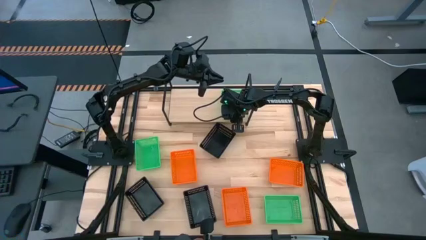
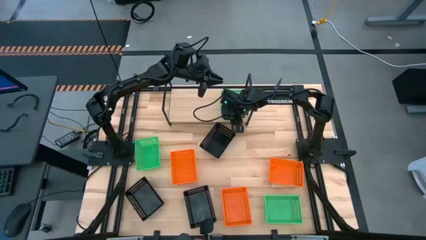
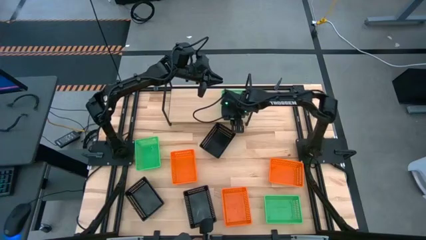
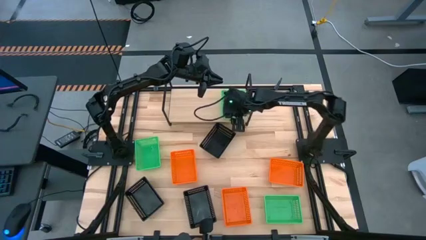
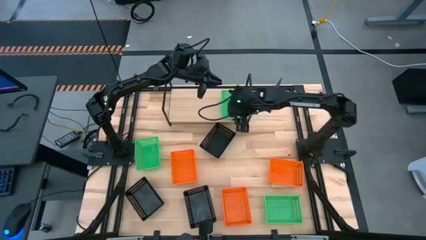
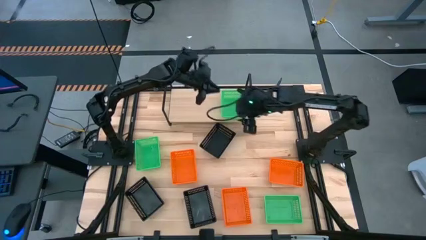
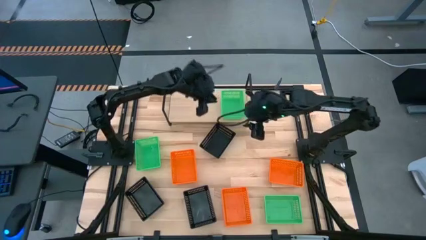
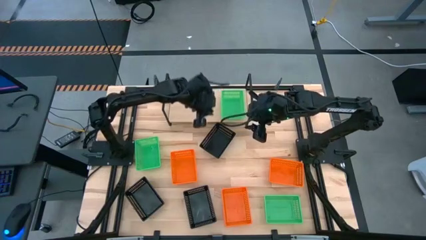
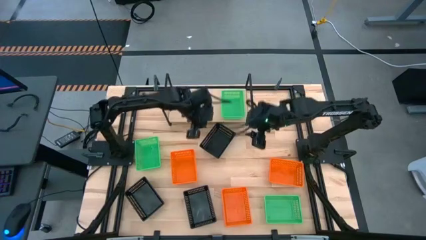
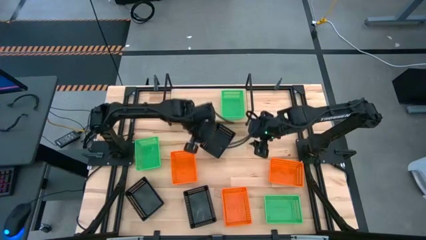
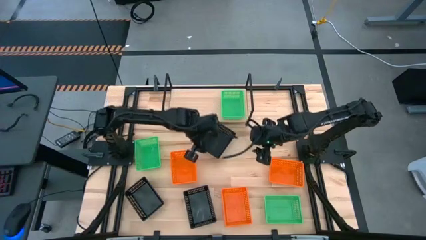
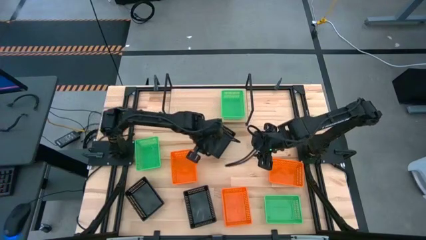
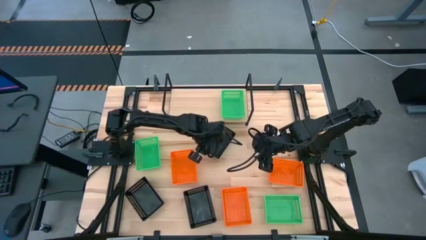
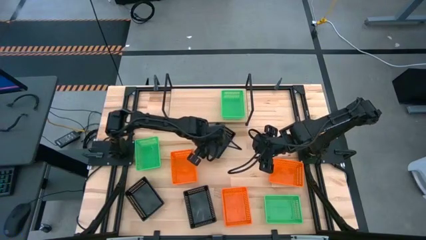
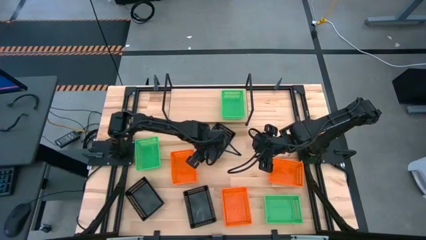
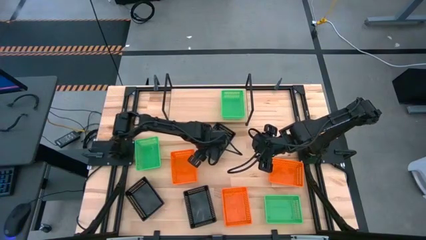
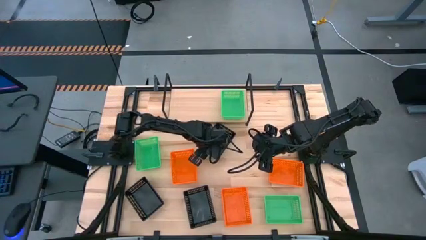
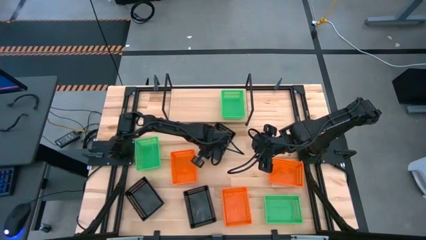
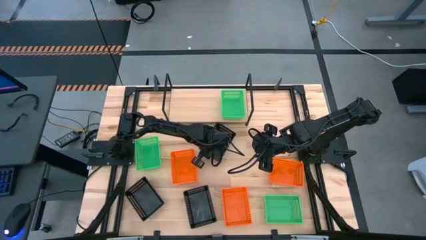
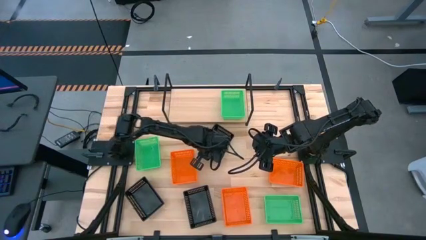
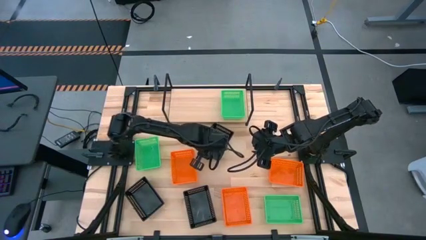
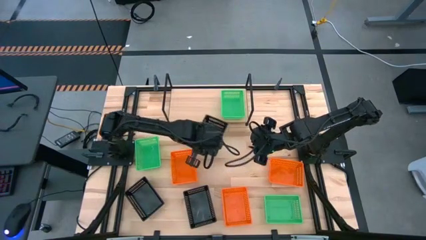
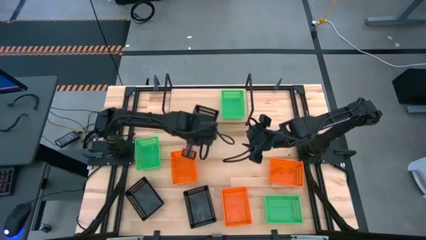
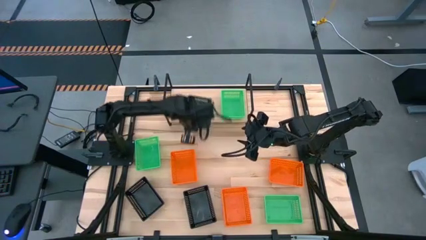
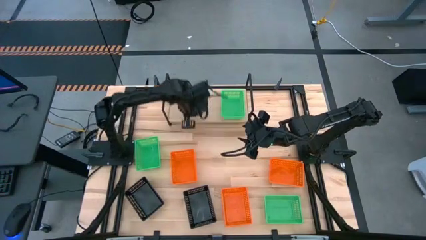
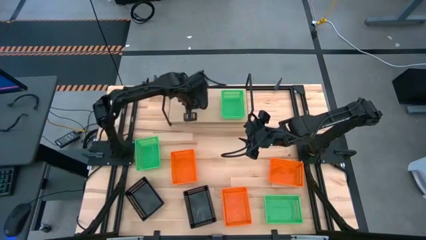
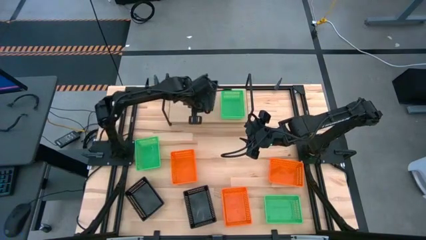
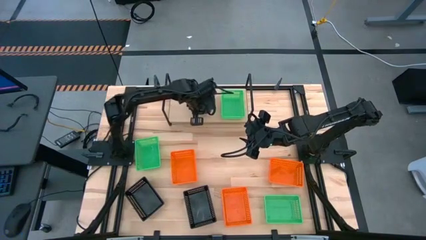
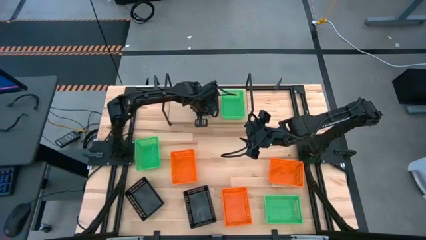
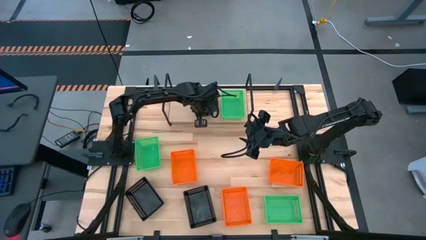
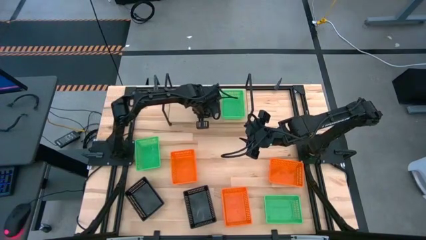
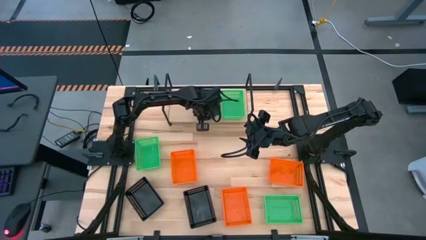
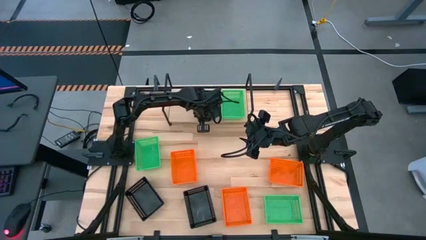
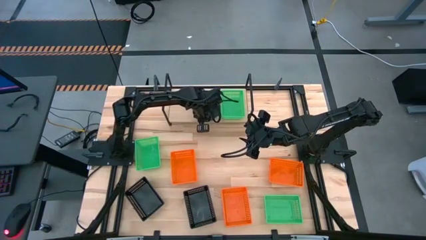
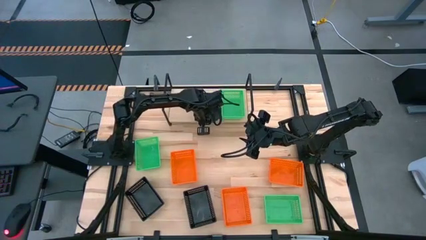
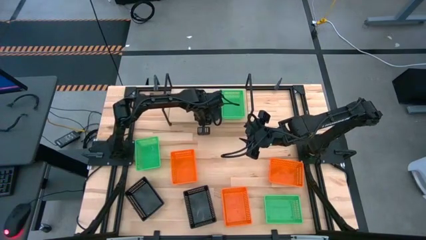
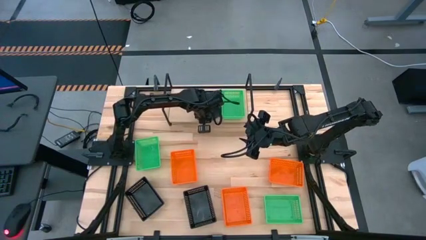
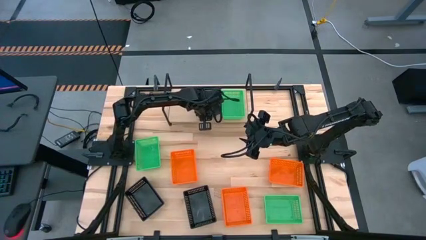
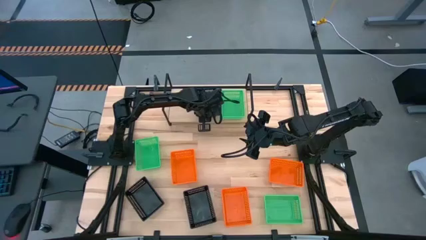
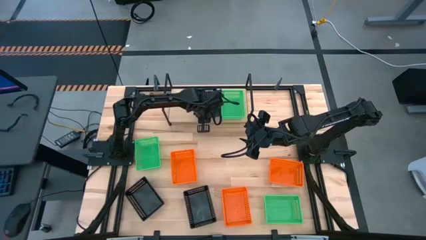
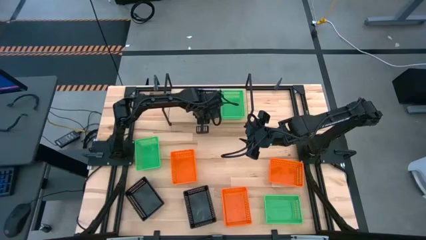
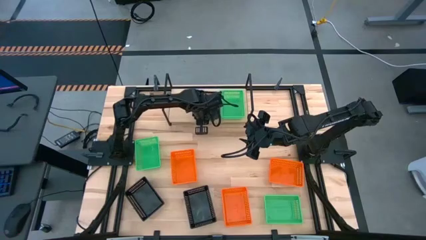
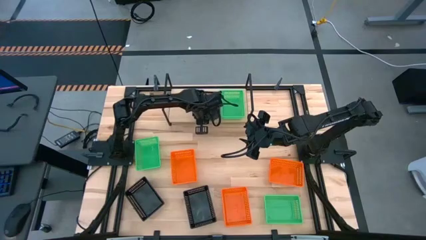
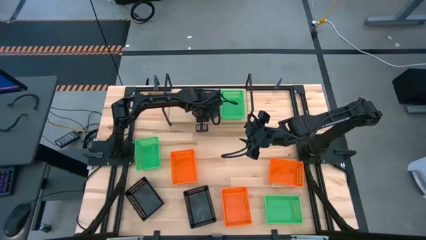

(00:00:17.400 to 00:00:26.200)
Task: Stack baskets on shelf by color
Put the top black bin on the shelf

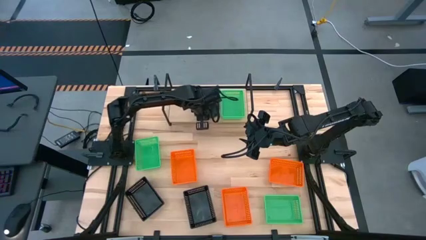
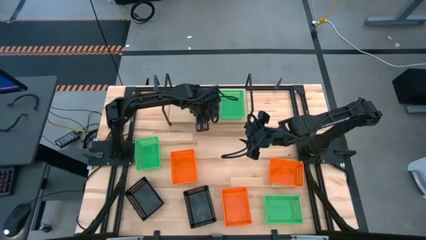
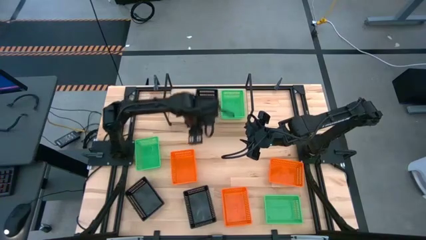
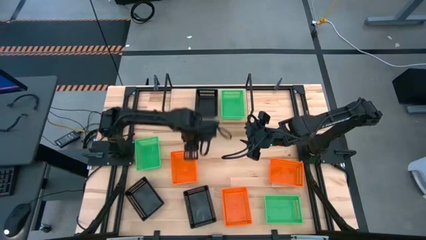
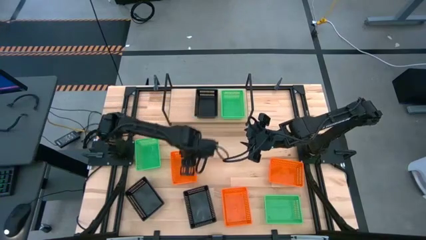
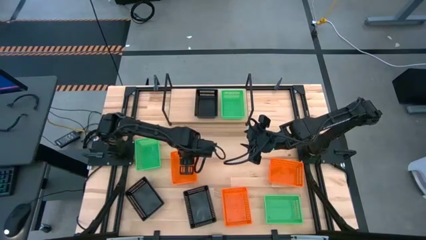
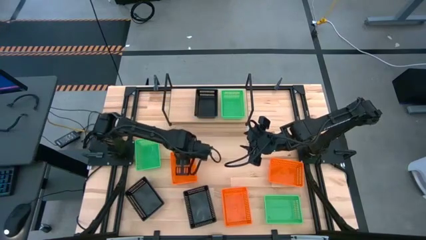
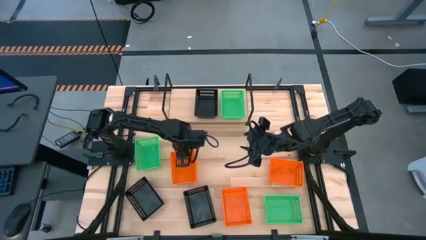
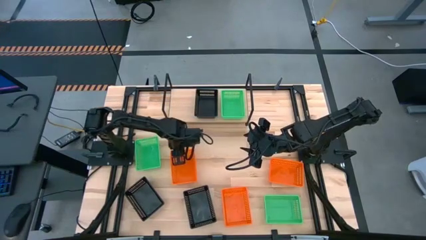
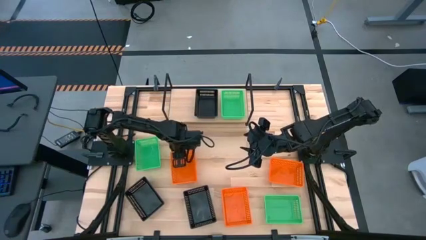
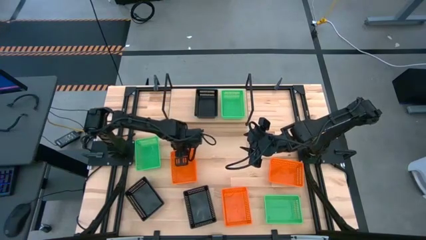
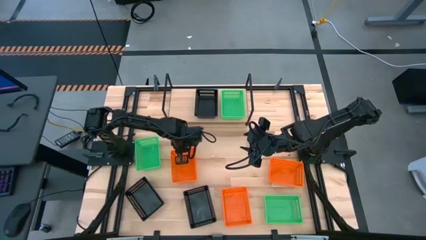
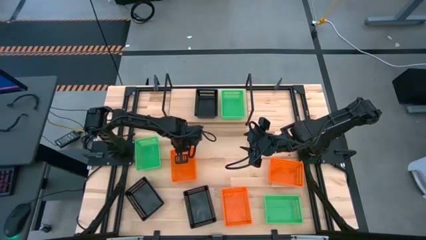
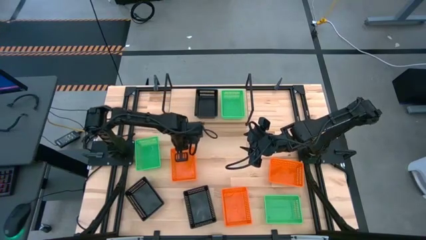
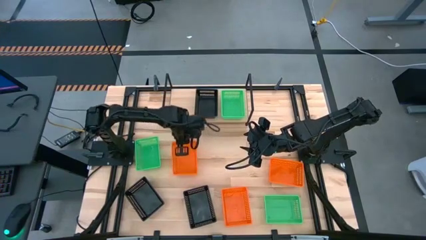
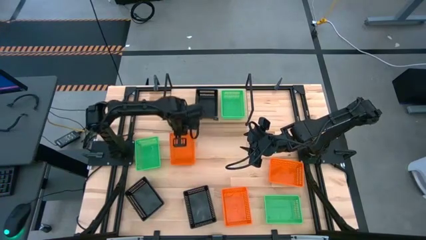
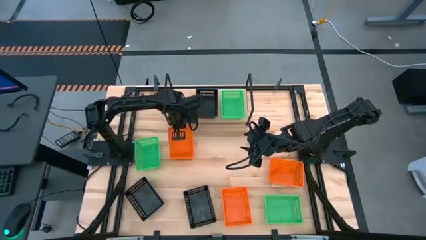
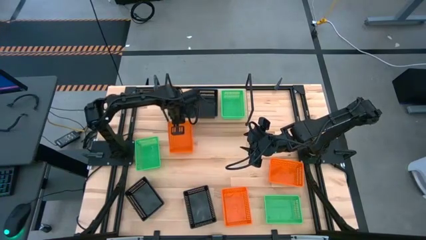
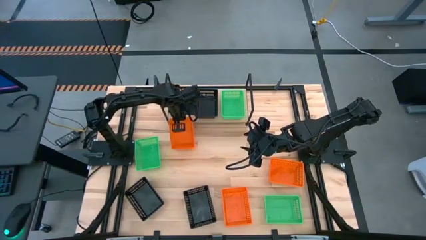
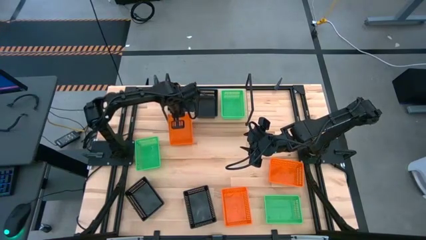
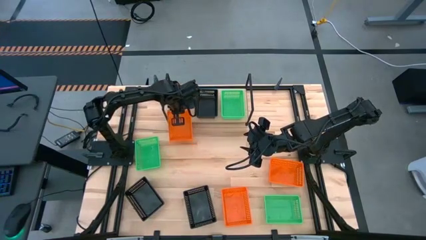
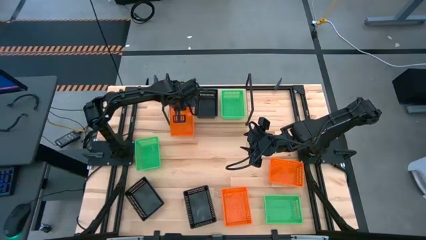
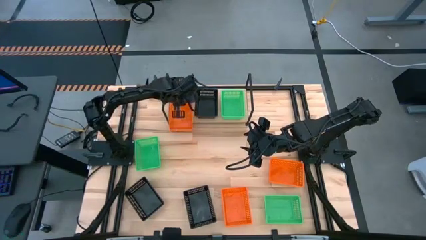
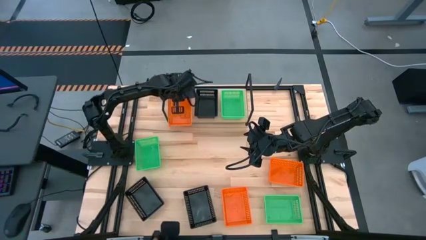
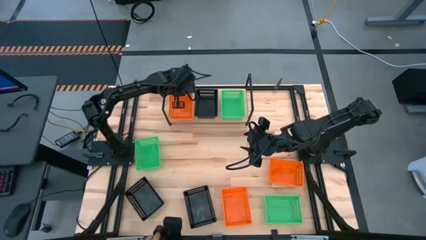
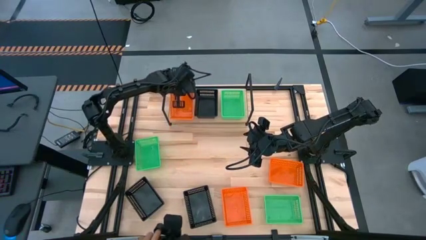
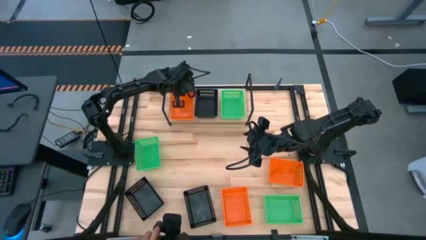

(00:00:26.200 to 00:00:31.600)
Put the top left orange bin on the shelf
